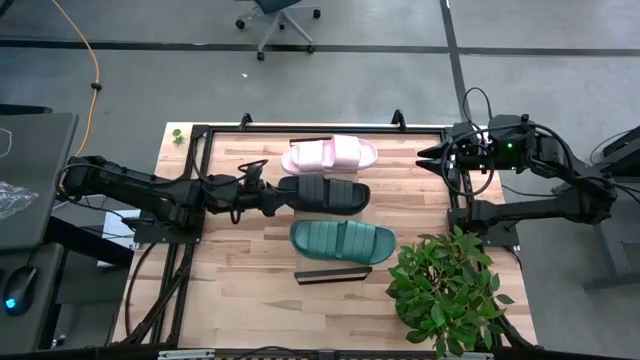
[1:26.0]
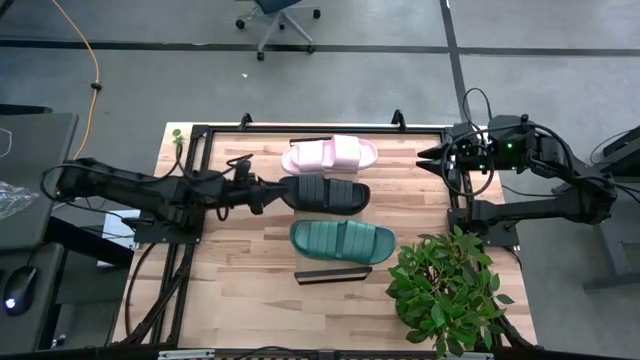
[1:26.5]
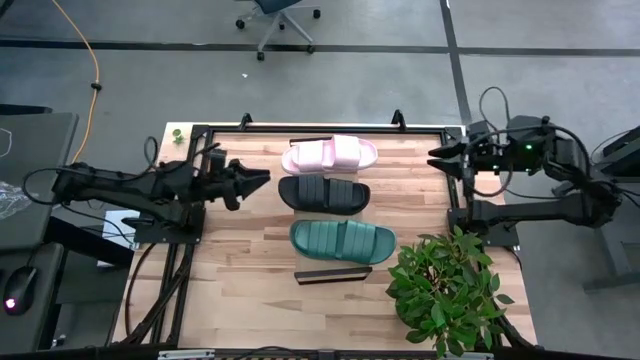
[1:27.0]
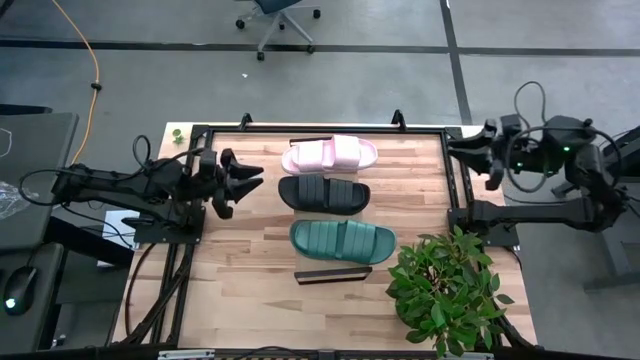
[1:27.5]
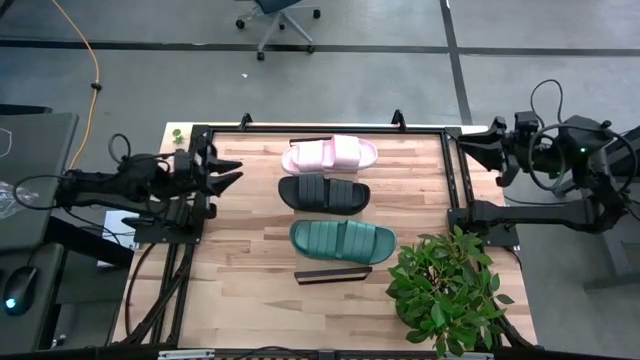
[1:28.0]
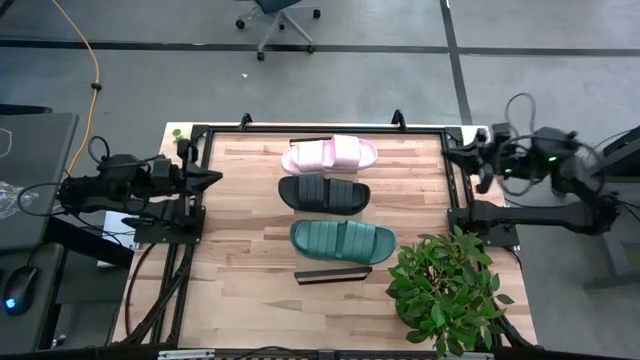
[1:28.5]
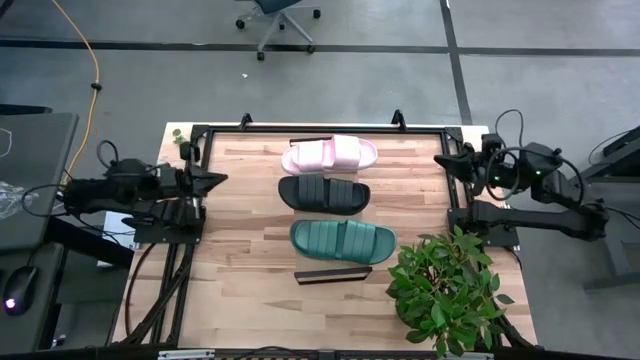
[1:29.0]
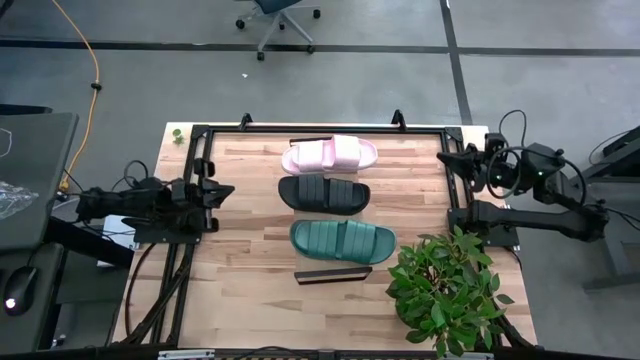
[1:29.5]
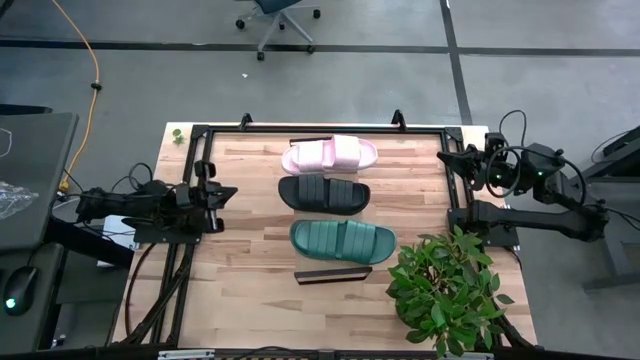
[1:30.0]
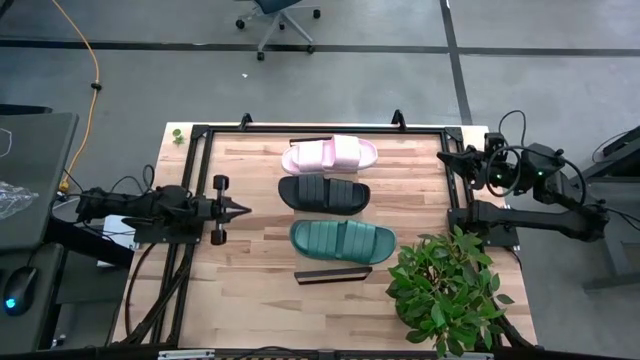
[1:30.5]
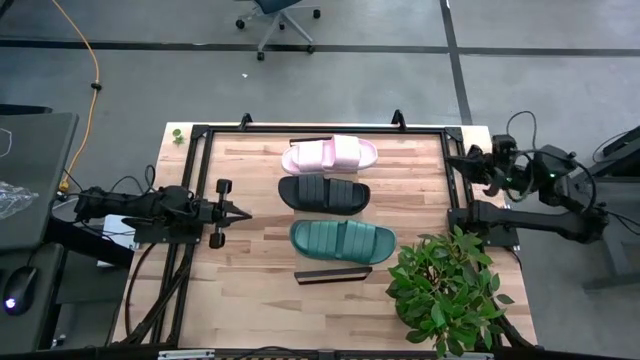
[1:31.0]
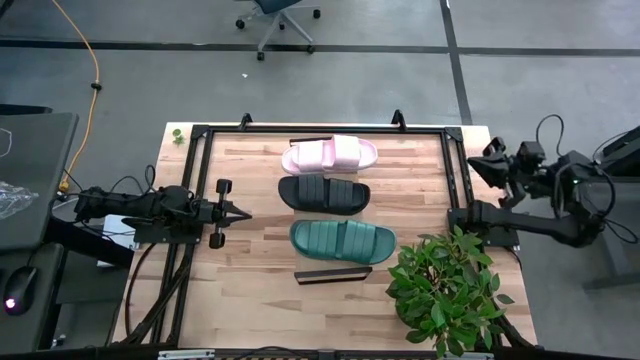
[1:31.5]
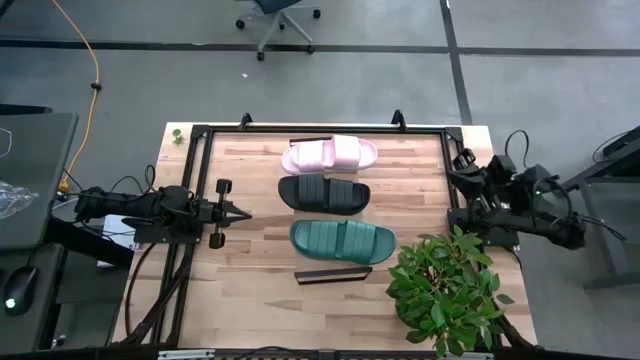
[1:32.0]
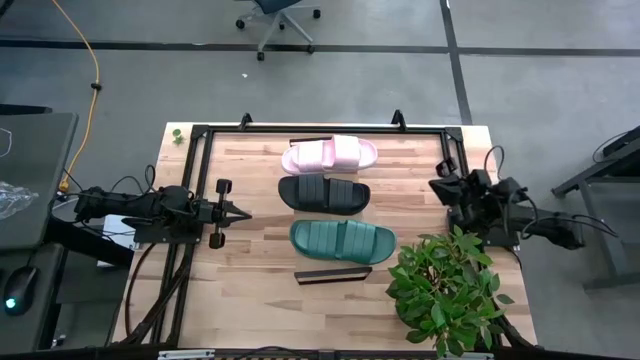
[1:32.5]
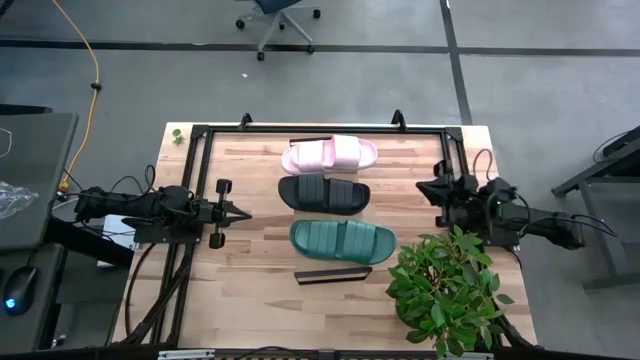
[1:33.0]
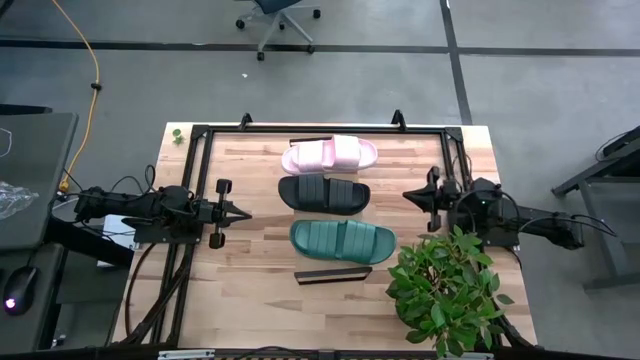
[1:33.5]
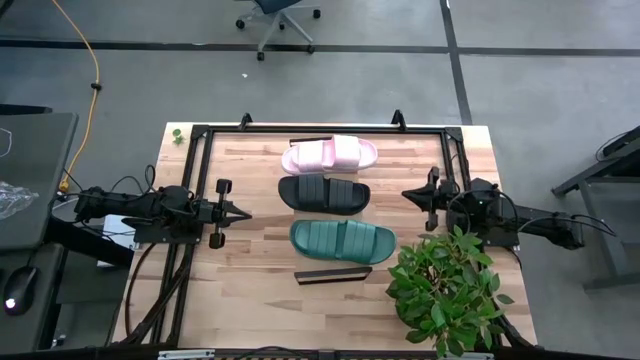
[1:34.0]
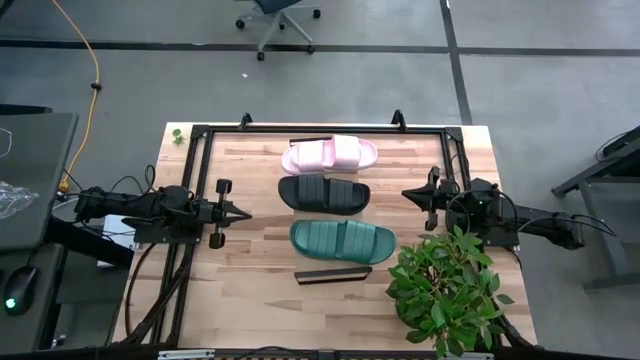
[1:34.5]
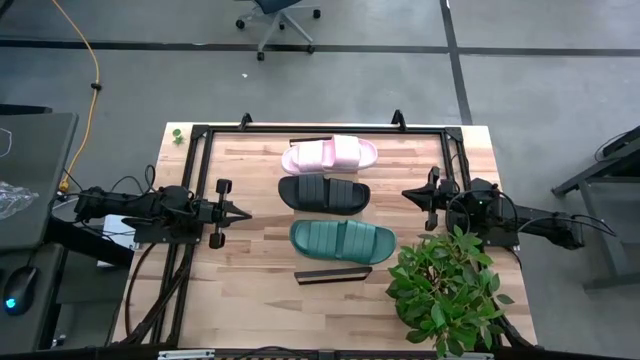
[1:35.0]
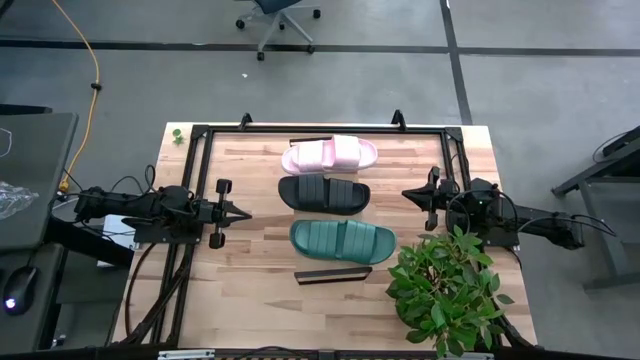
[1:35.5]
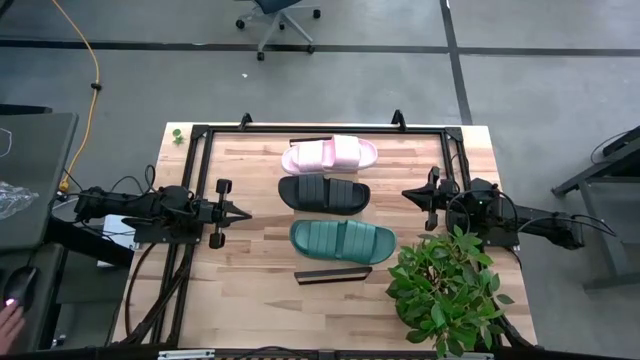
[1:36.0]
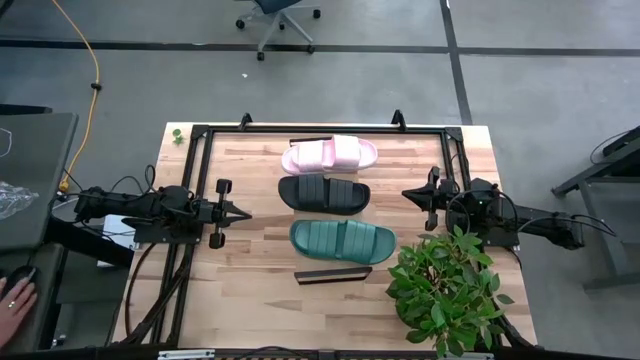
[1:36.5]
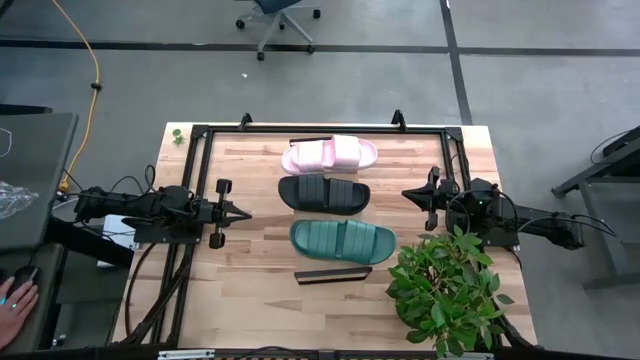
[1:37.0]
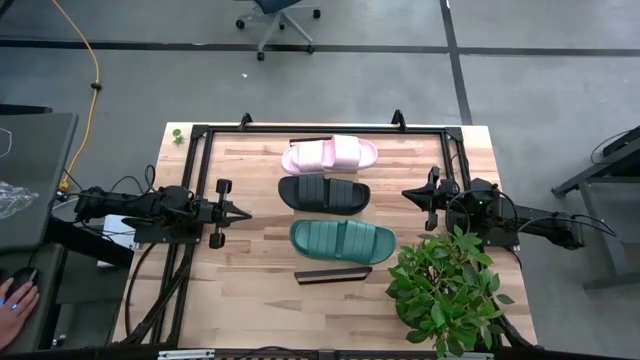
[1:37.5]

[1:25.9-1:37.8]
Task: Pick and place slippers onto the shelf
Return to Home Position

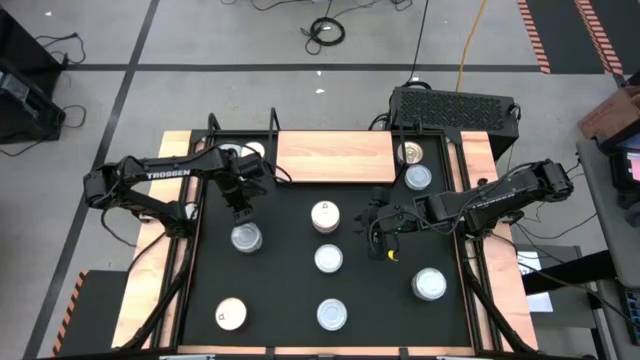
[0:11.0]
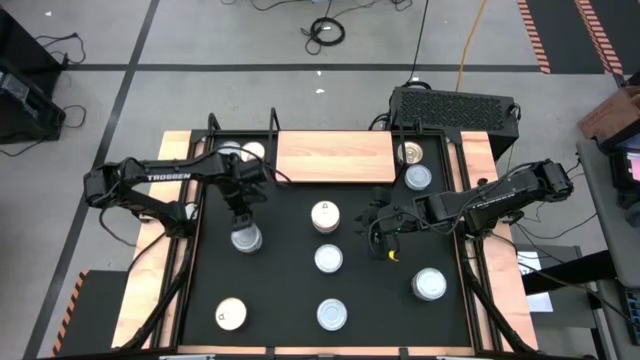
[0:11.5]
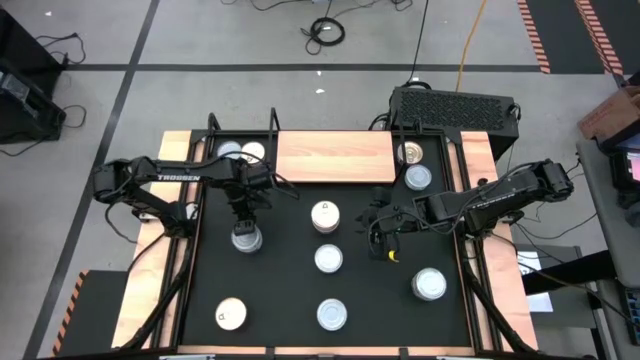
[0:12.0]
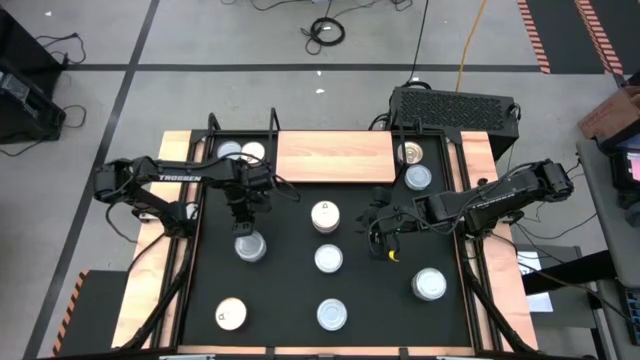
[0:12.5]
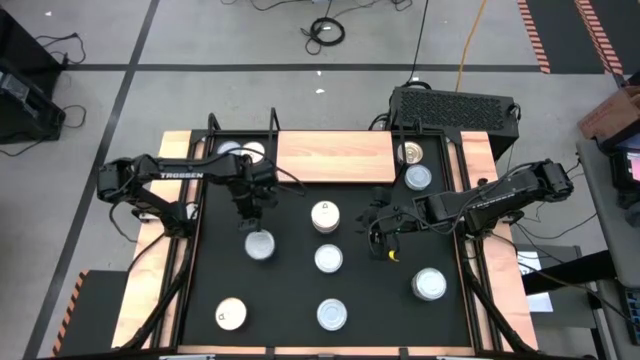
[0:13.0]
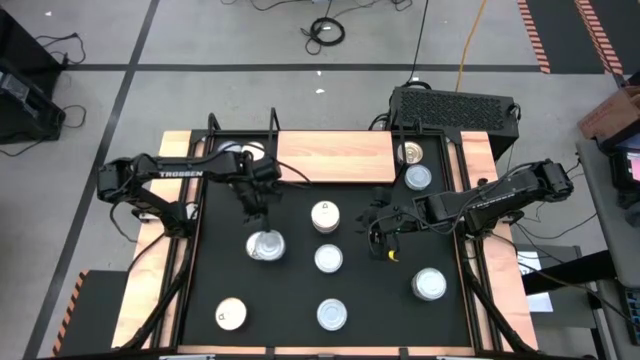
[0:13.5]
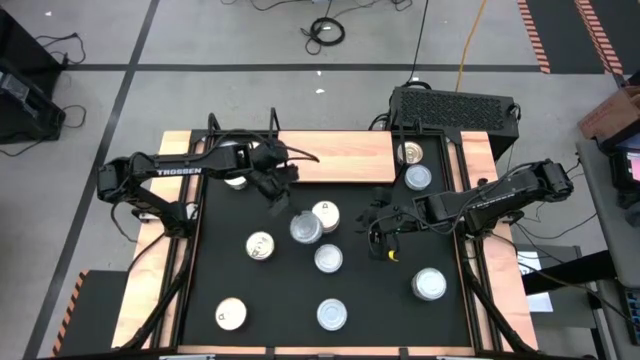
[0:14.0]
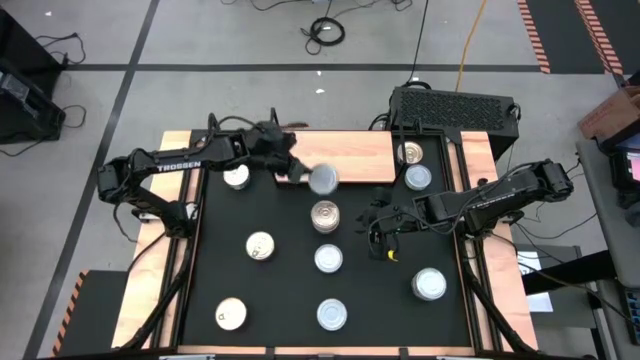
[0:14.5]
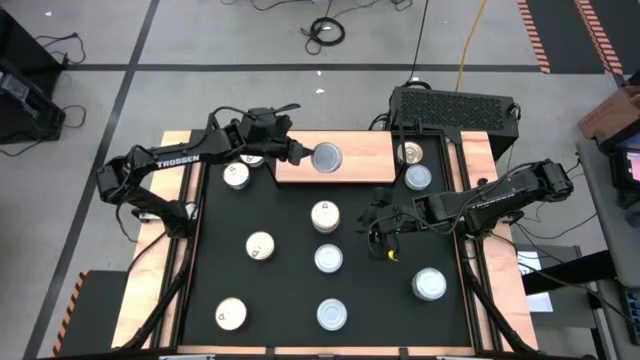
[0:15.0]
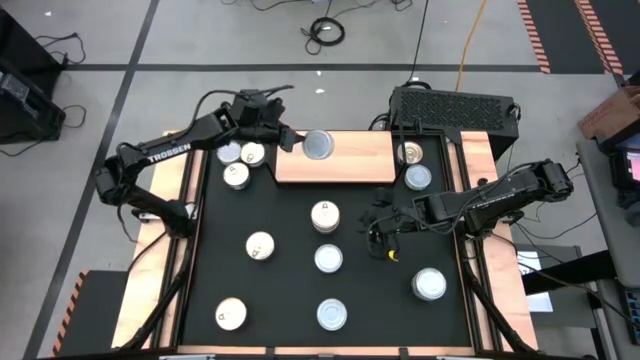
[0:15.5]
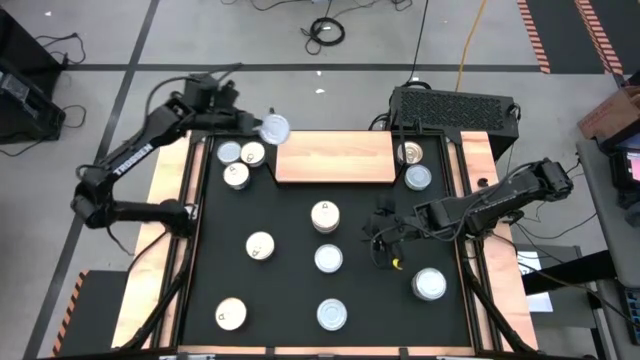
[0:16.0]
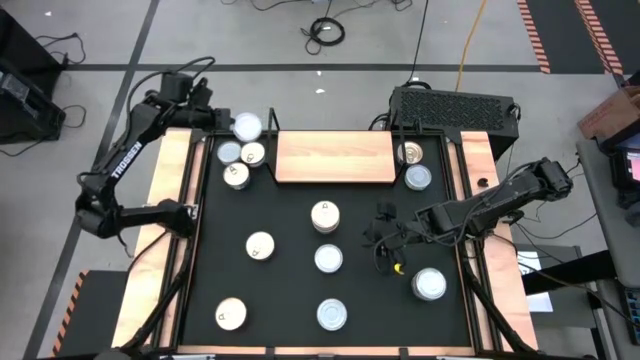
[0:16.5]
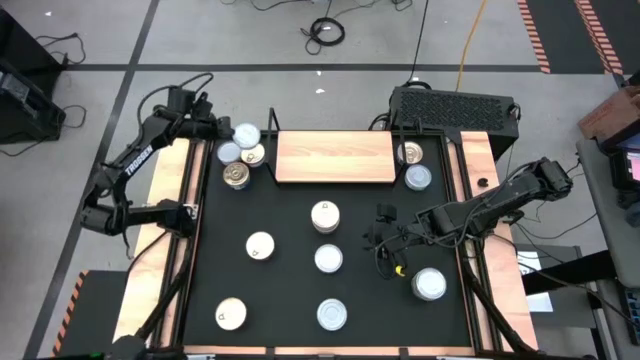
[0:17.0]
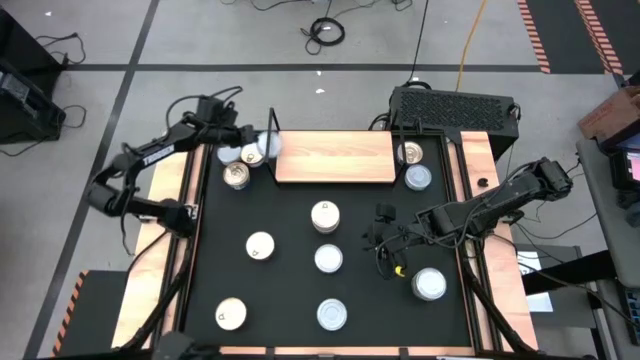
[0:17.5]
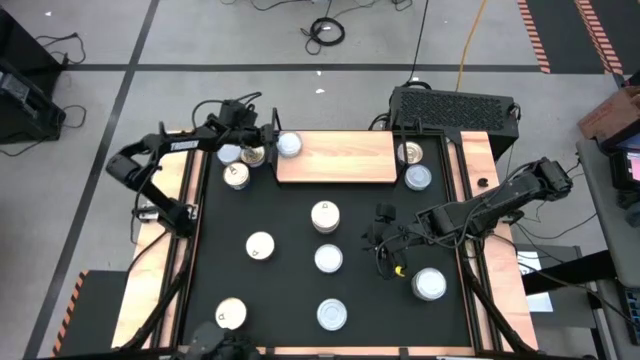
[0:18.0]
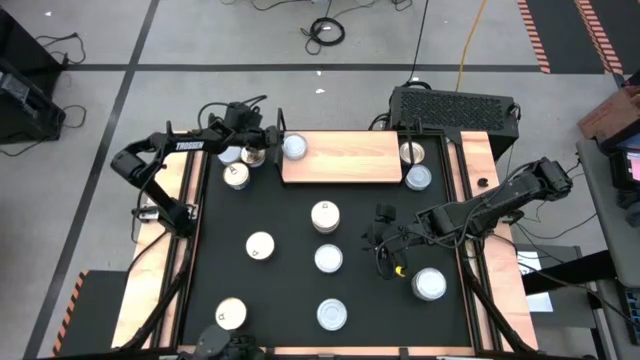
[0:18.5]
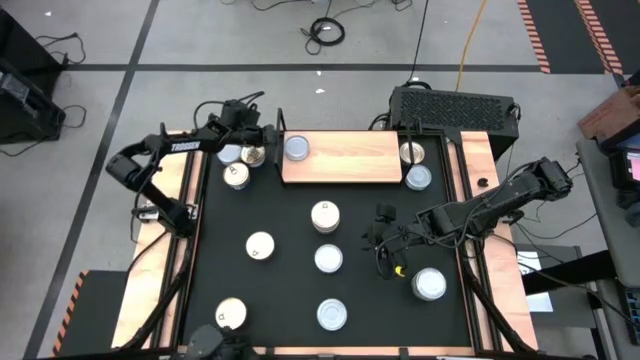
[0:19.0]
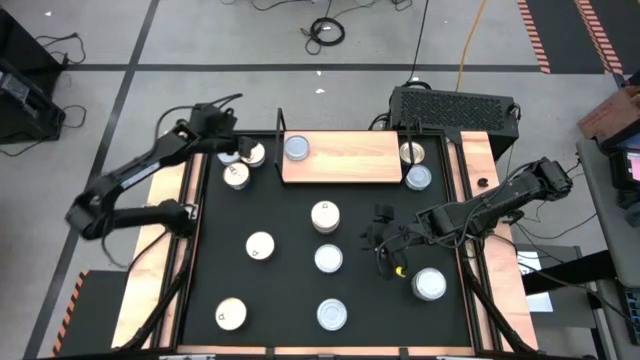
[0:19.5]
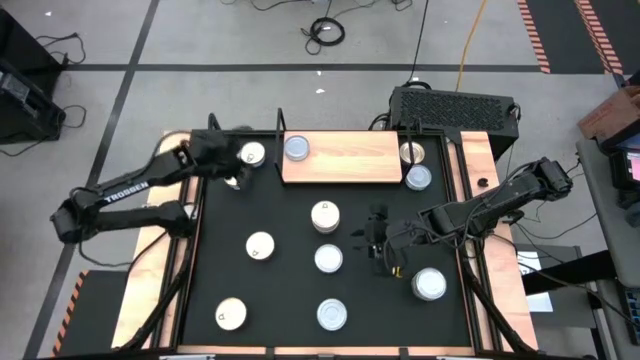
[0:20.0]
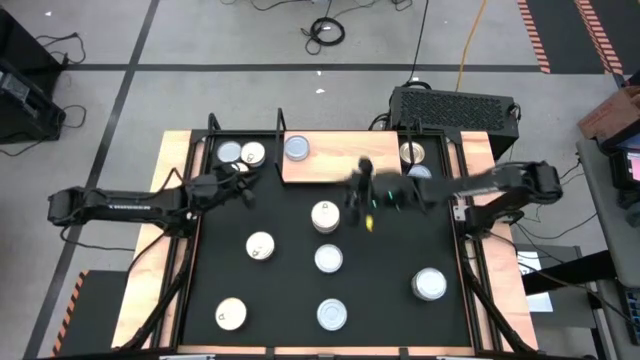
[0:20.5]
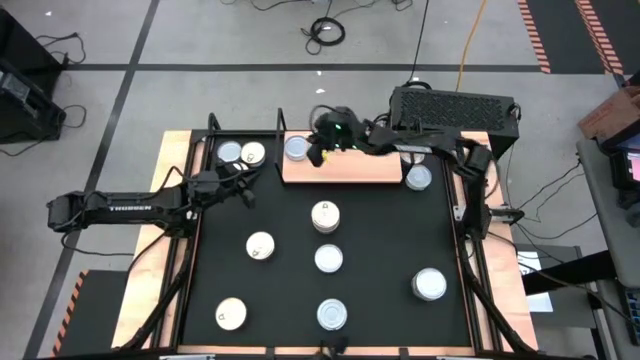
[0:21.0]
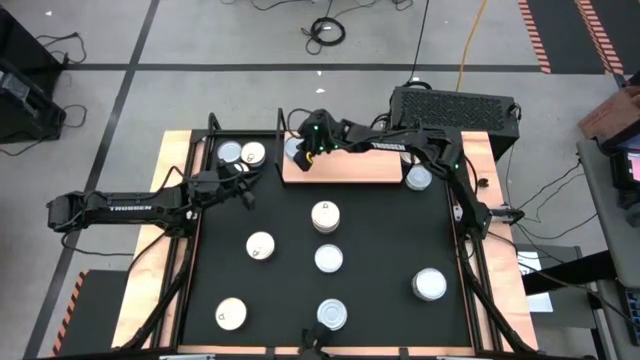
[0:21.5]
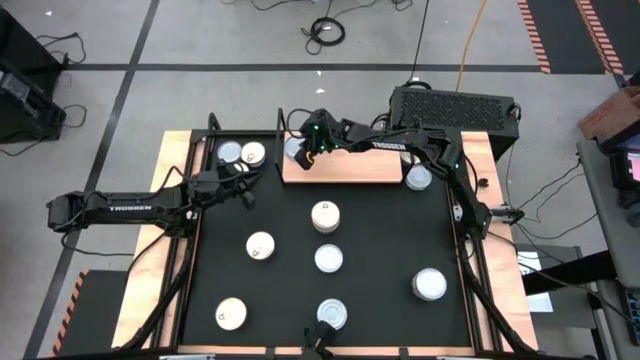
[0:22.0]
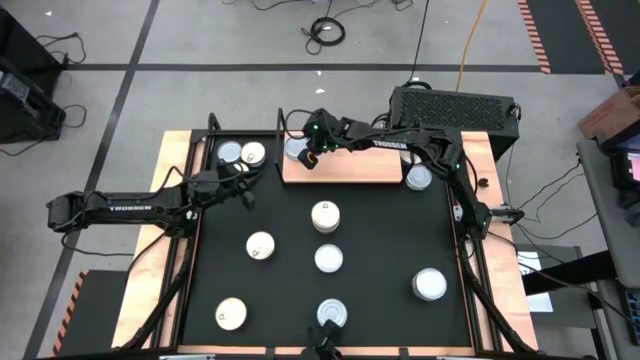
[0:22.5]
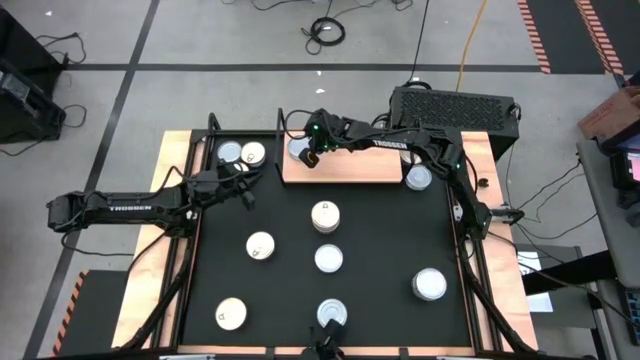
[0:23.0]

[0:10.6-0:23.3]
Task: Stack canned seafood by type on shelf
Put the middle left green tuna can on the shelf
